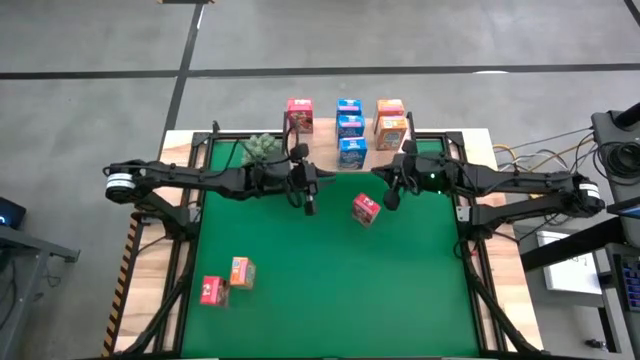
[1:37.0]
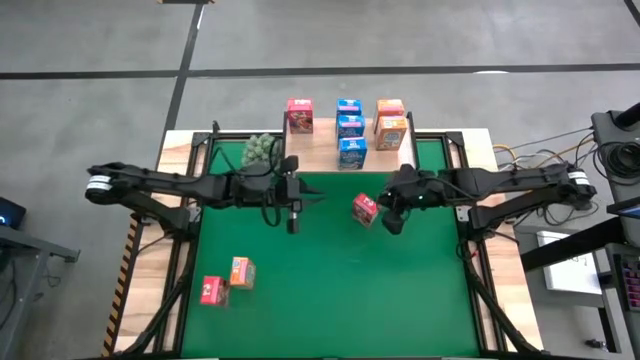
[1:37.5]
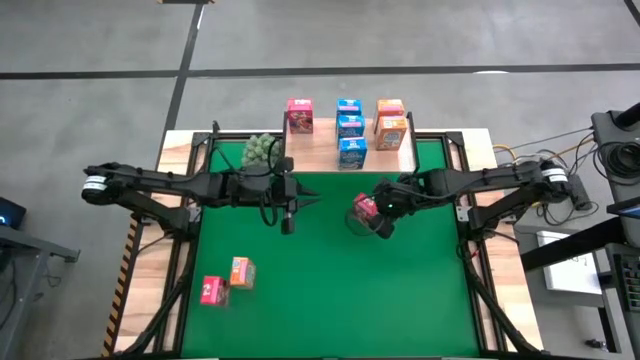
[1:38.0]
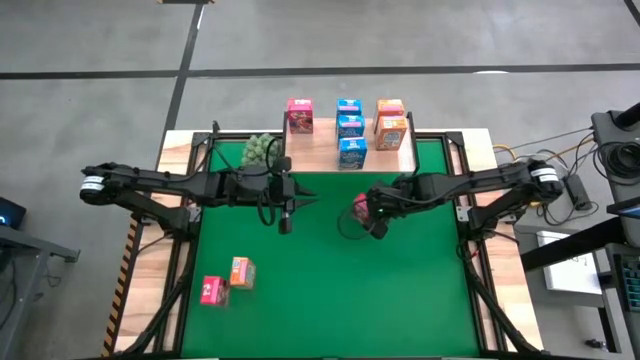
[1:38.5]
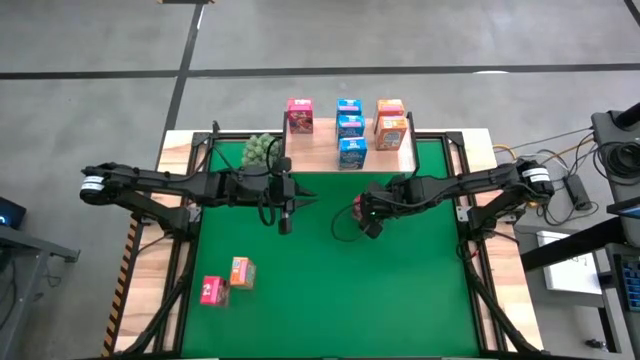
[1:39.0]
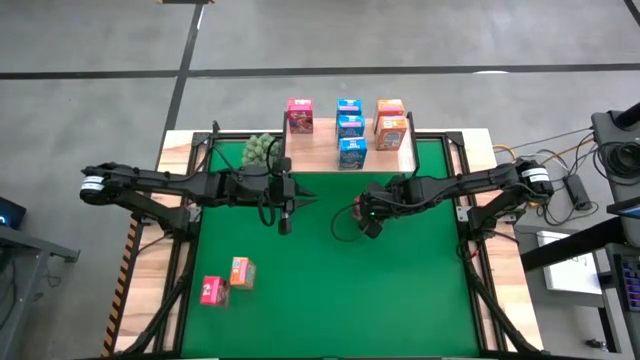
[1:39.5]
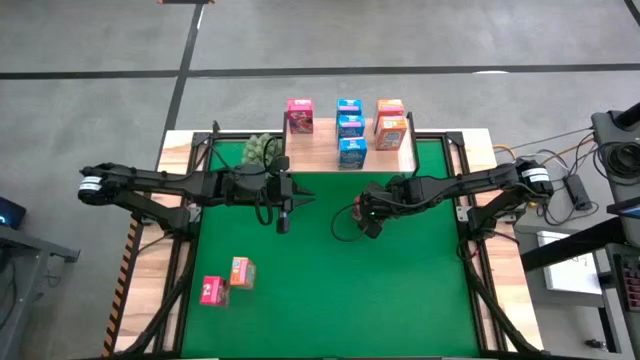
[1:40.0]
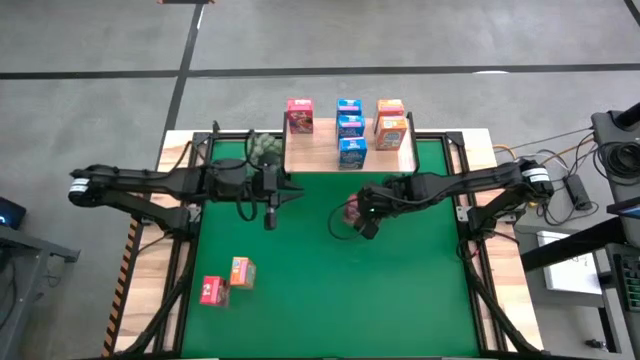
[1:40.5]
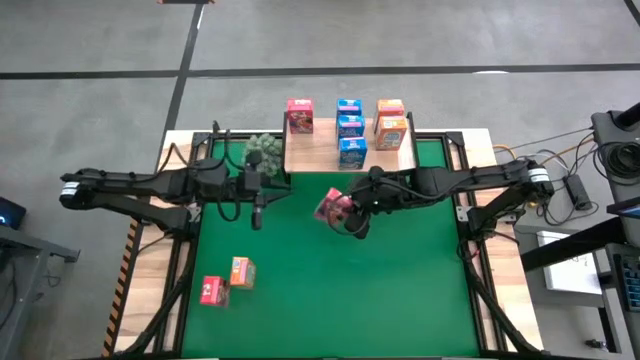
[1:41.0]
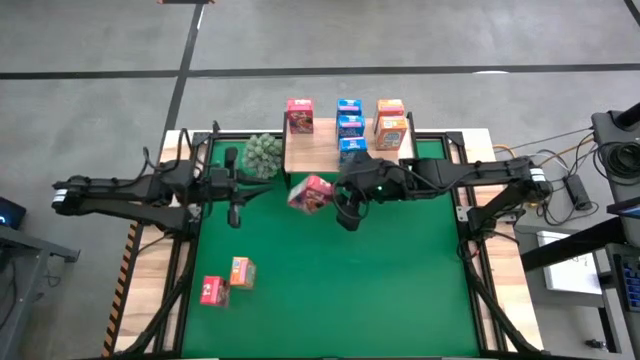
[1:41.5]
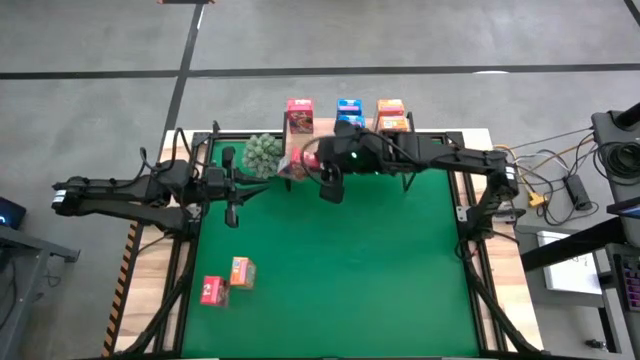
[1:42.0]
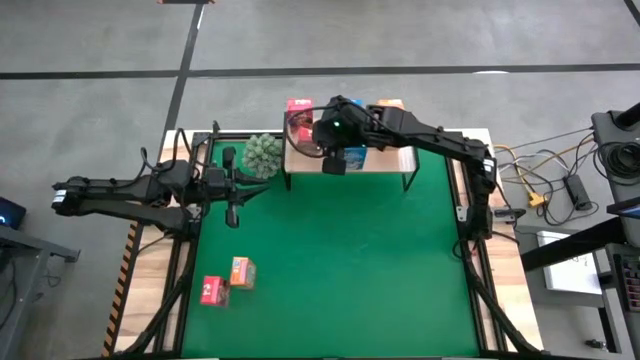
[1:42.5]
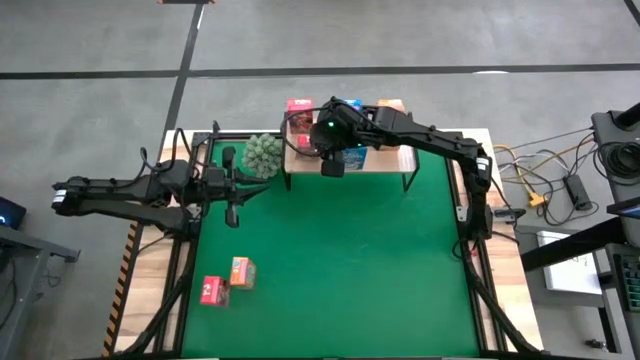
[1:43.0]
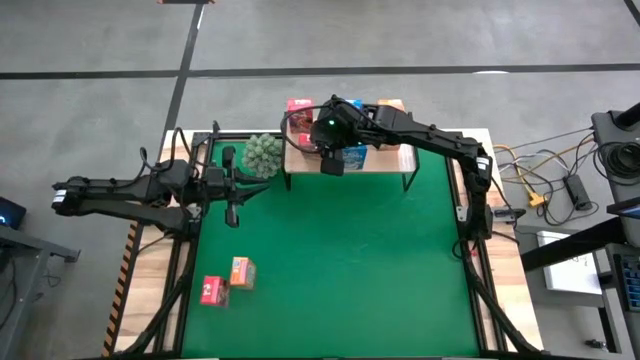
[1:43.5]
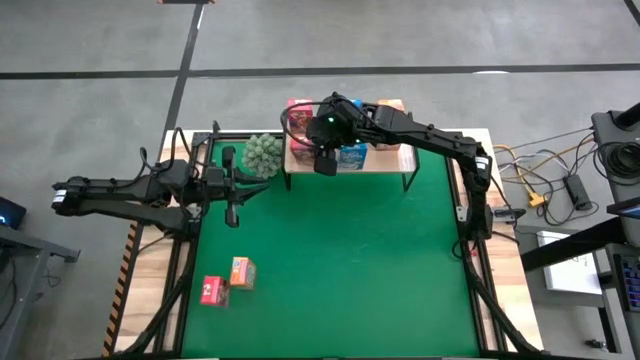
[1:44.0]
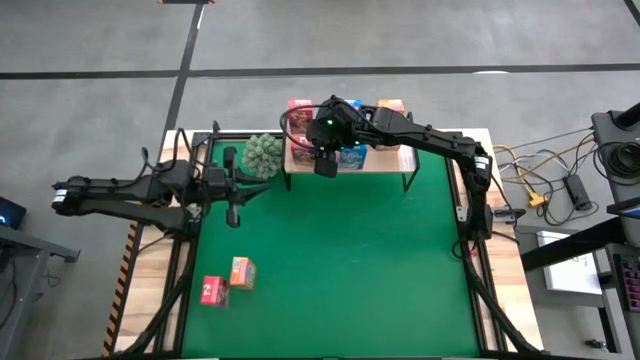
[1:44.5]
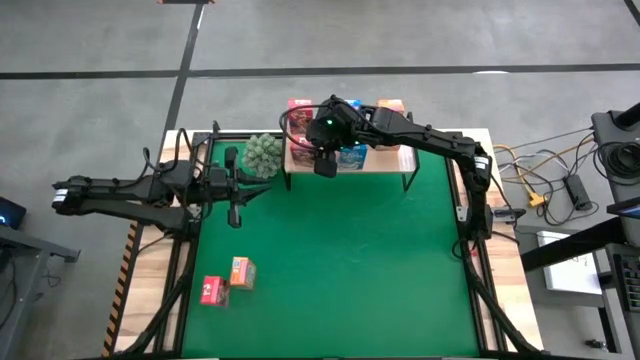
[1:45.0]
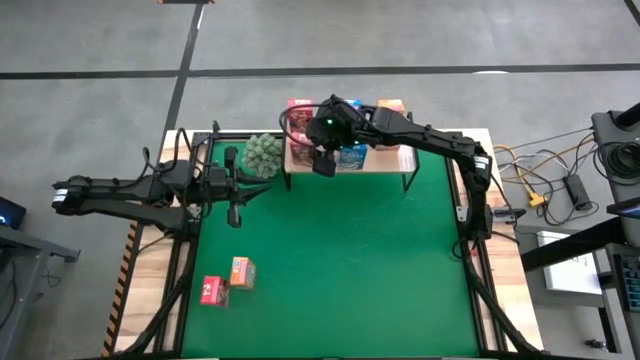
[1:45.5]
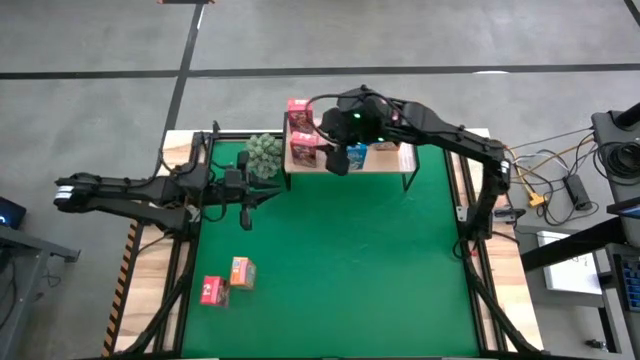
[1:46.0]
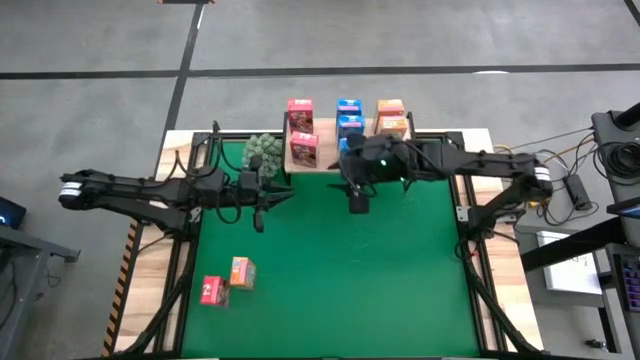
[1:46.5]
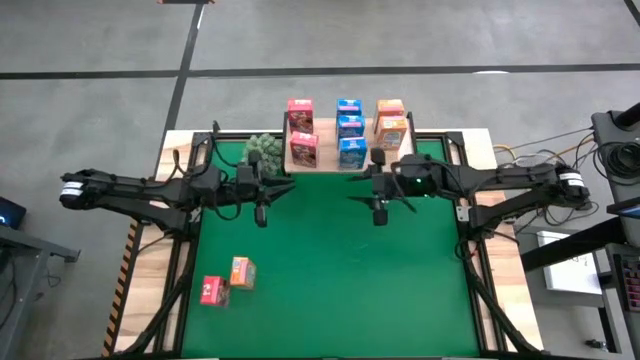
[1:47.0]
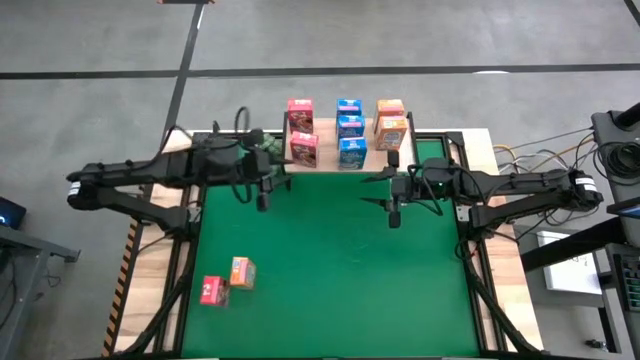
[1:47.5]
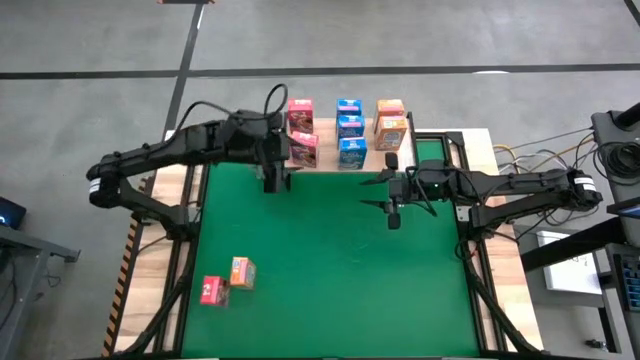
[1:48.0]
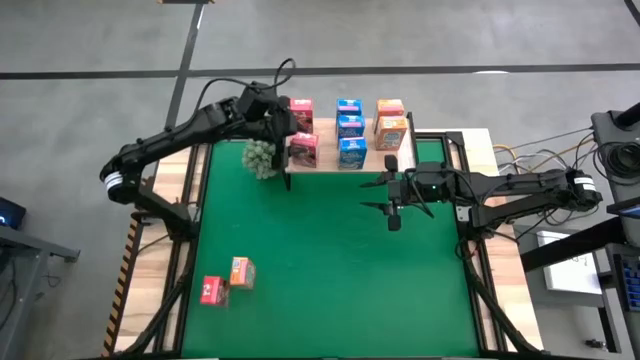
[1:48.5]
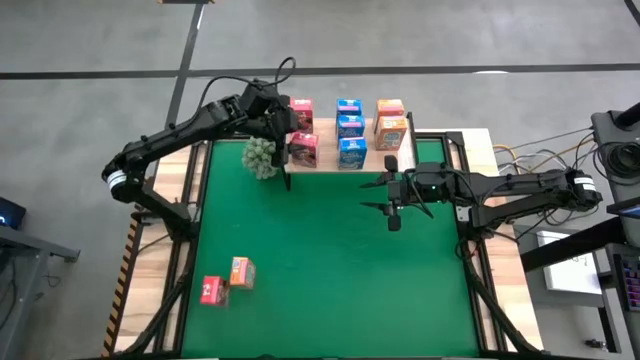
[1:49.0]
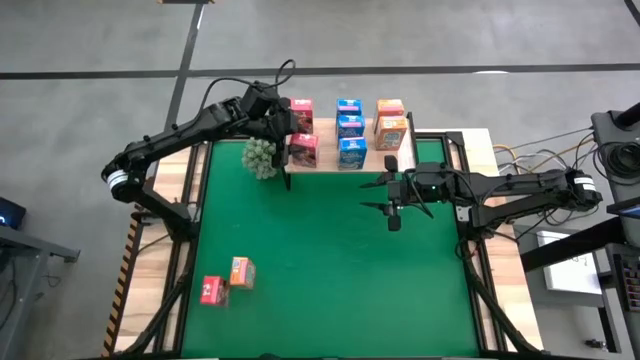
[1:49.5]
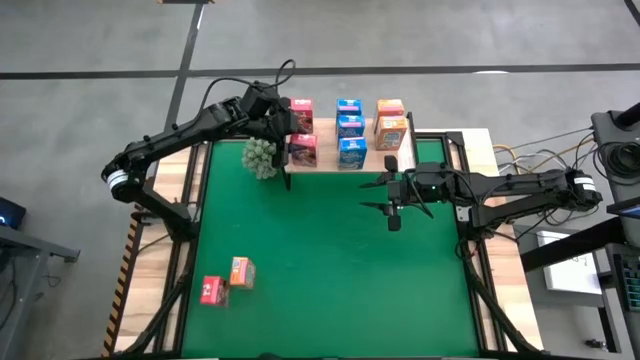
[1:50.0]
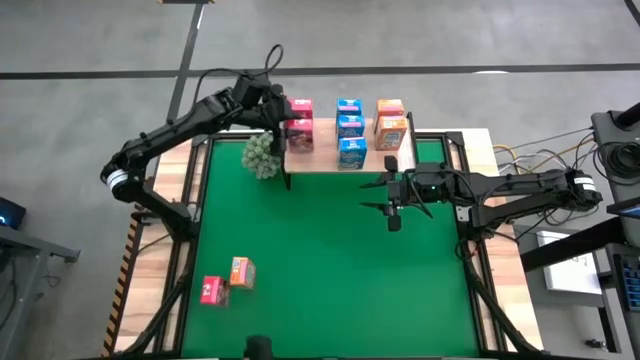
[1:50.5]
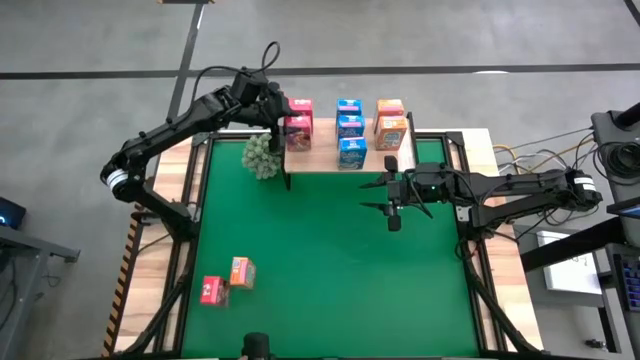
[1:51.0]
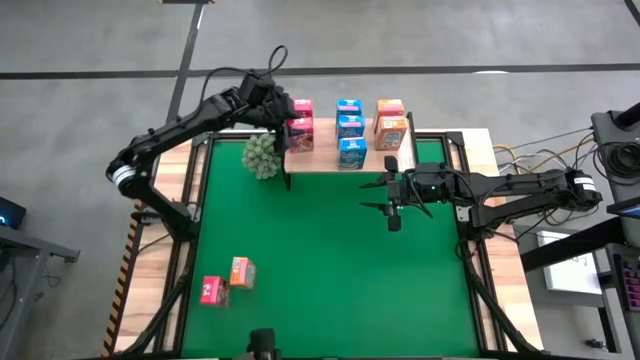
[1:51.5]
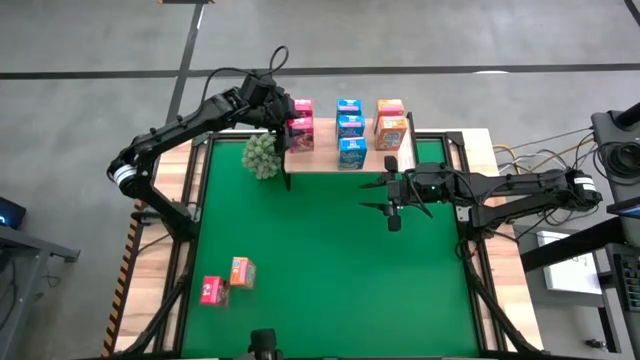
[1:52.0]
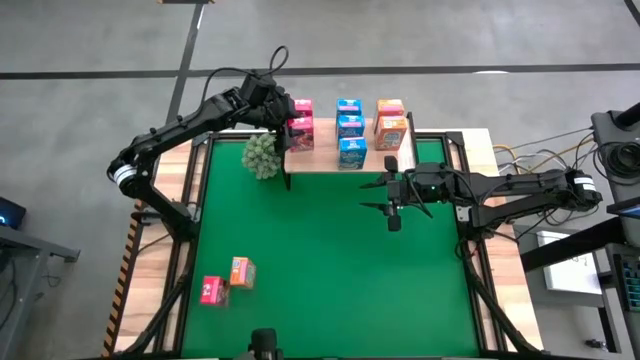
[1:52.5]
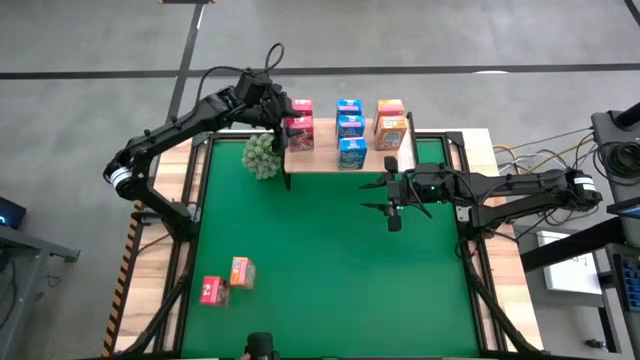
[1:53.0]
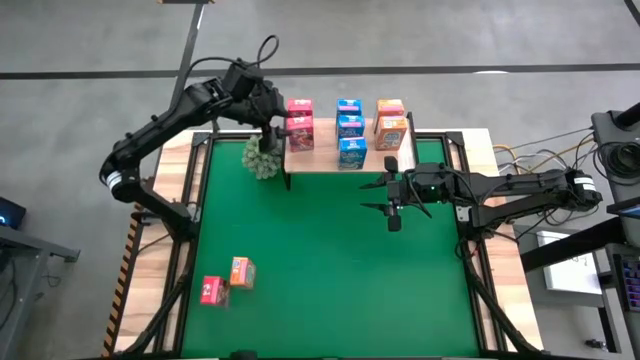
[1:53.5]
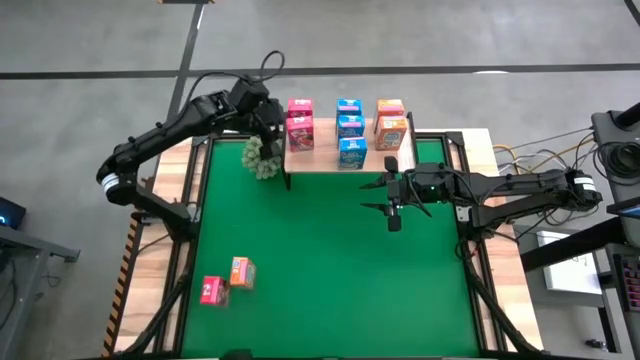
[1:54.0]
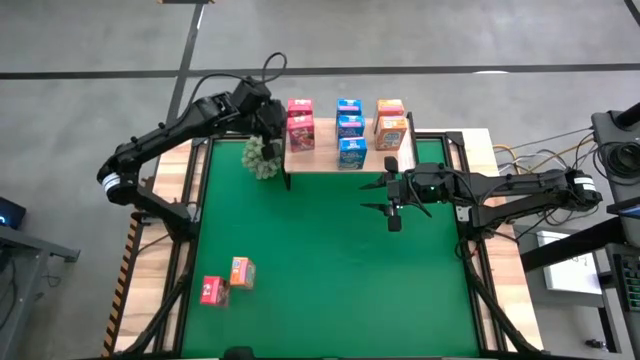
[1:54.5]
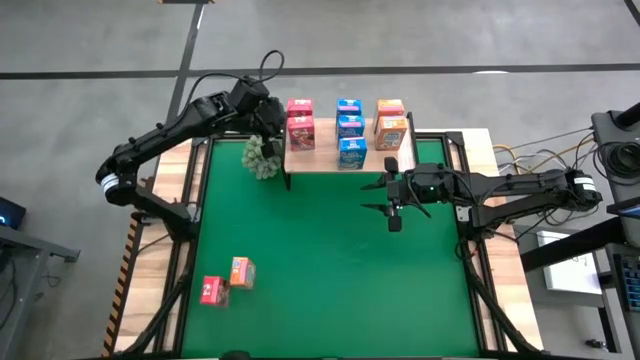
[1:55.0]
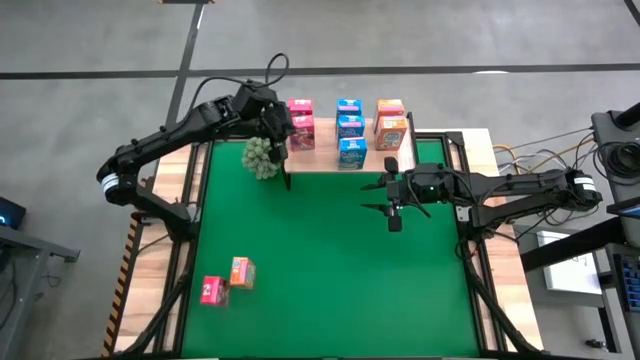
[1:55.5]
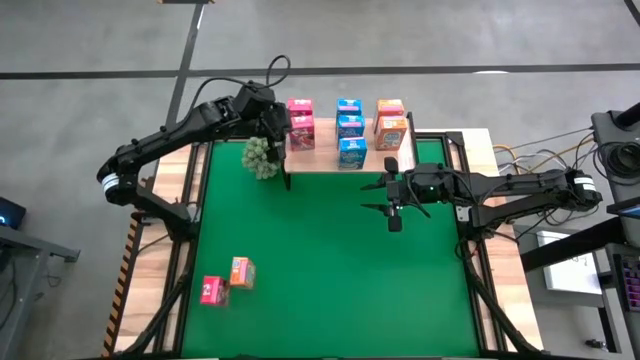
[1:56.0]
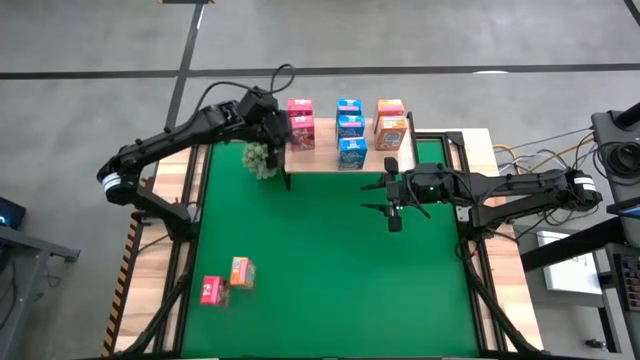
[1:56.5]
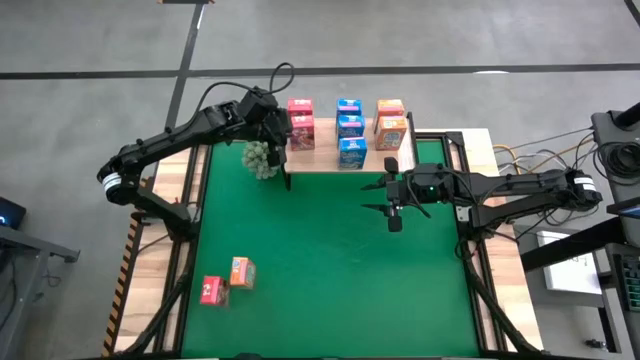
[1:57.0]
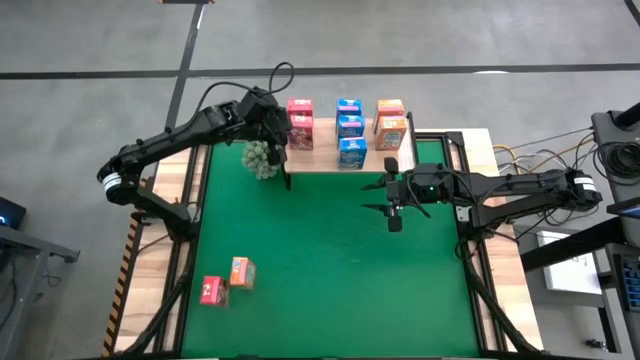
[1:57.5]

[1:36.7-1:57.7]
Task: Stack cereal on shelf
Put the top red cereal box on the shelf aligned with the other red cereal box
